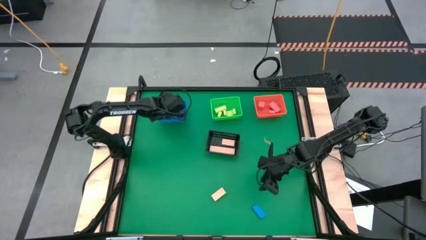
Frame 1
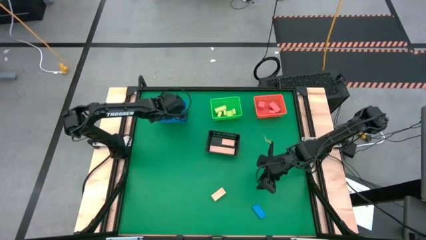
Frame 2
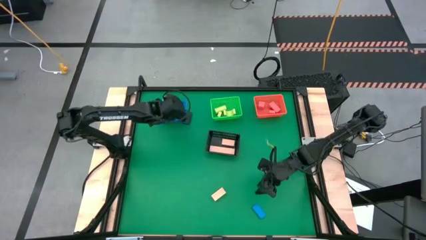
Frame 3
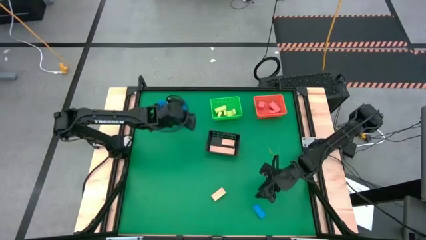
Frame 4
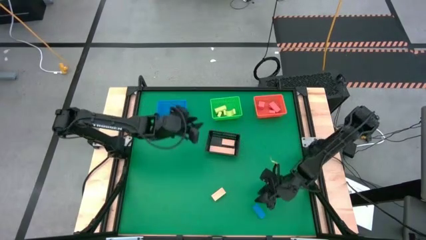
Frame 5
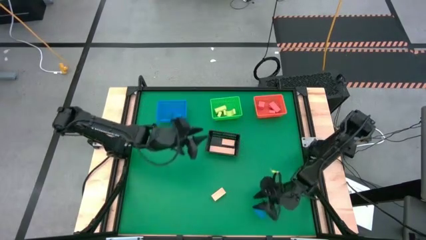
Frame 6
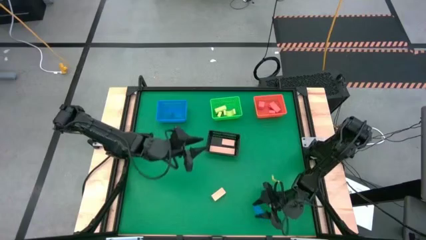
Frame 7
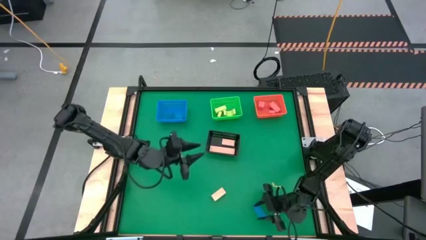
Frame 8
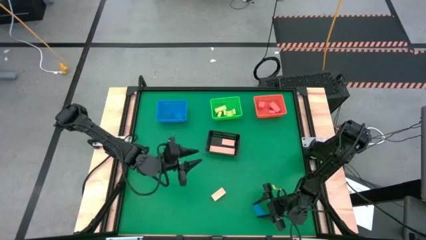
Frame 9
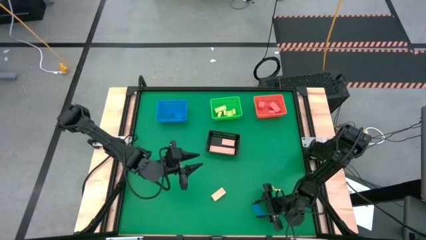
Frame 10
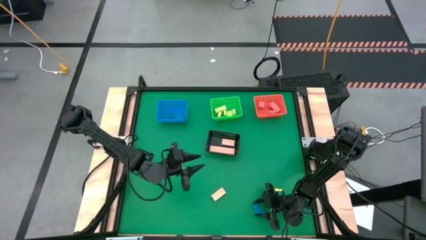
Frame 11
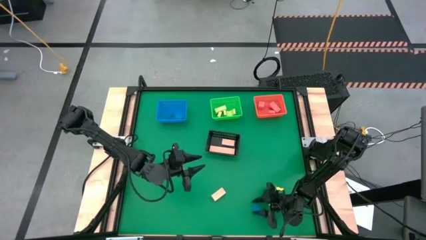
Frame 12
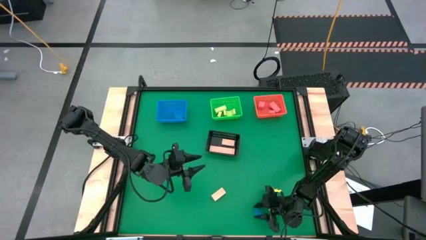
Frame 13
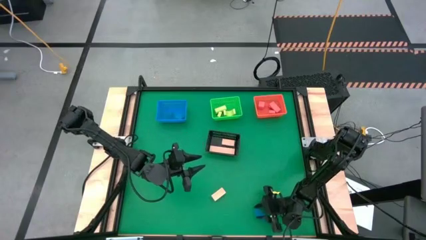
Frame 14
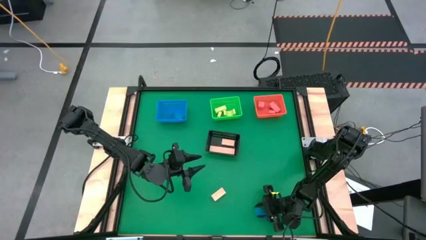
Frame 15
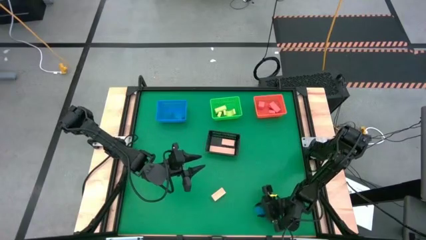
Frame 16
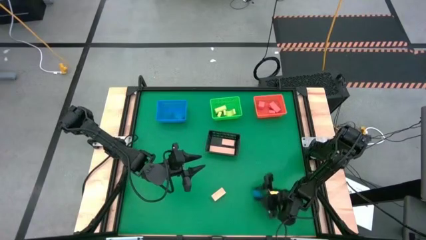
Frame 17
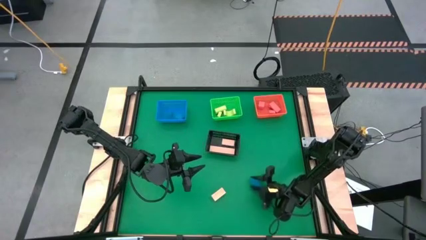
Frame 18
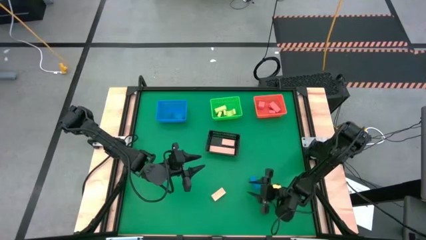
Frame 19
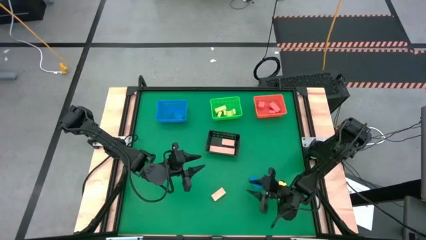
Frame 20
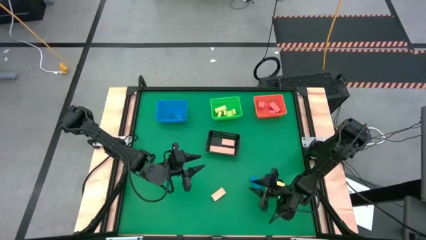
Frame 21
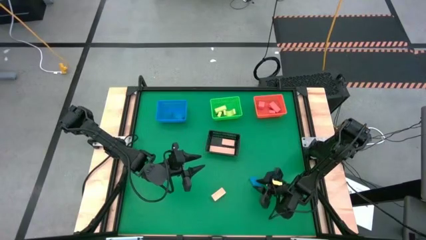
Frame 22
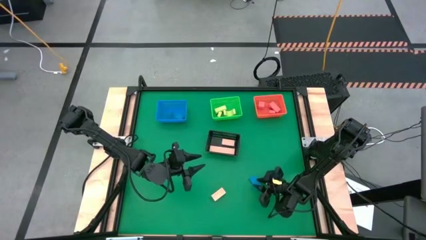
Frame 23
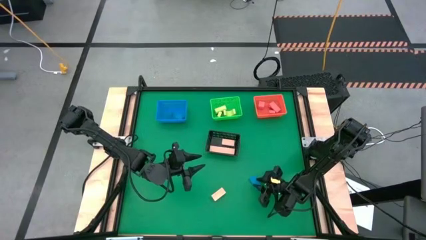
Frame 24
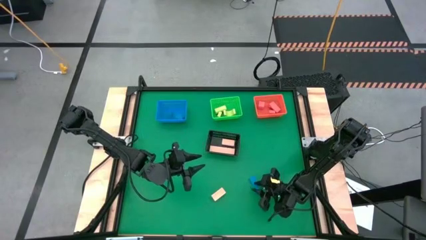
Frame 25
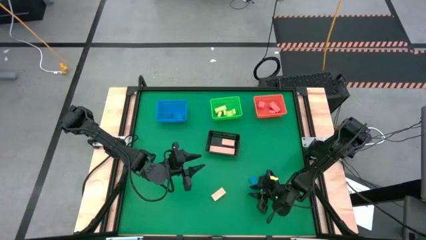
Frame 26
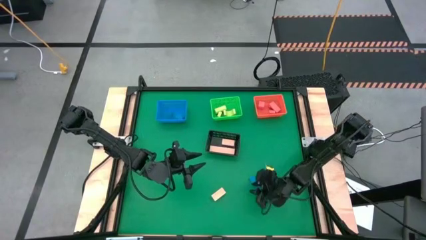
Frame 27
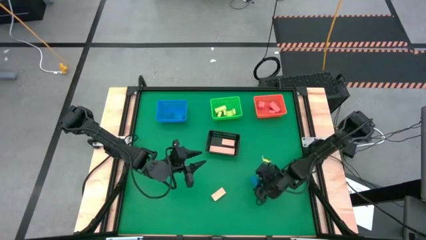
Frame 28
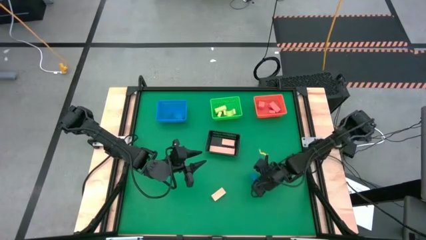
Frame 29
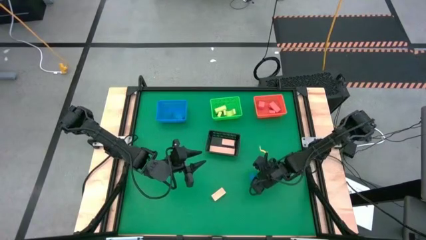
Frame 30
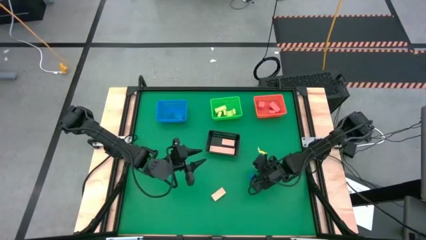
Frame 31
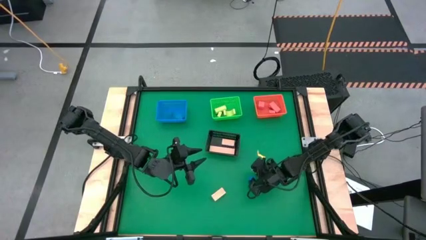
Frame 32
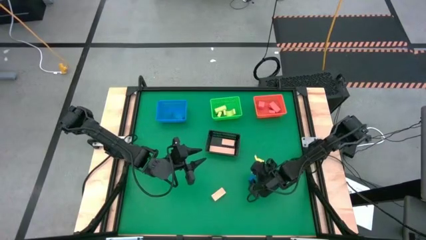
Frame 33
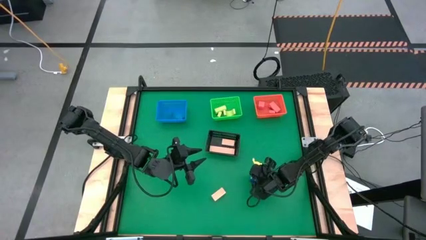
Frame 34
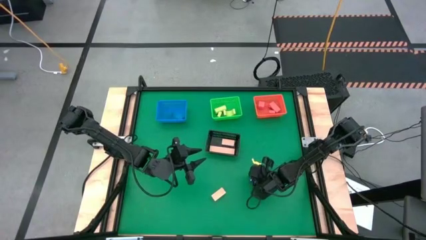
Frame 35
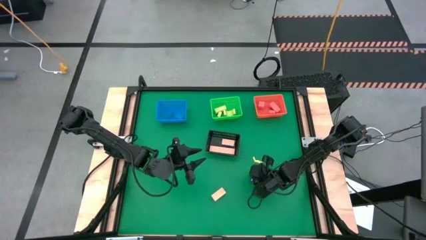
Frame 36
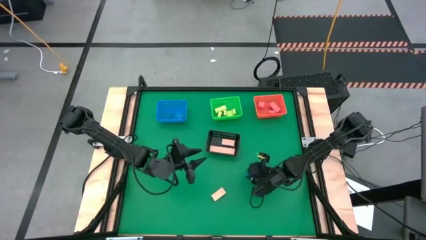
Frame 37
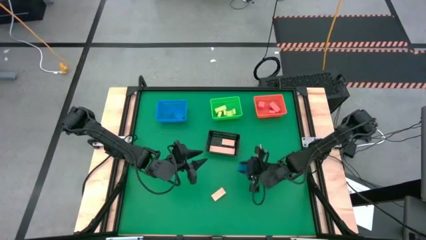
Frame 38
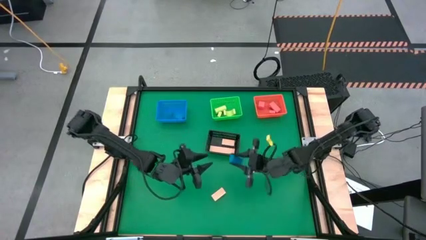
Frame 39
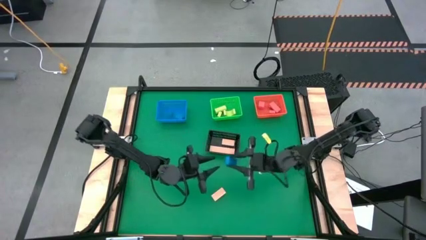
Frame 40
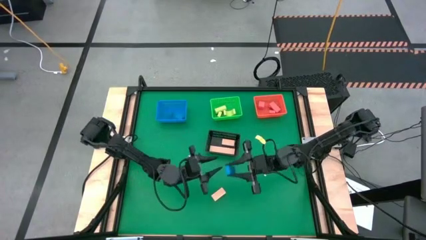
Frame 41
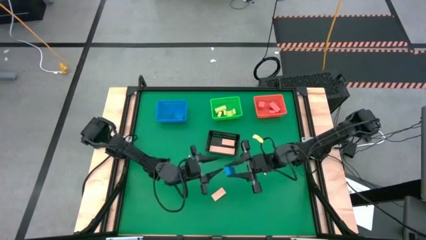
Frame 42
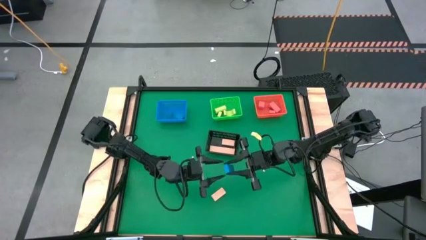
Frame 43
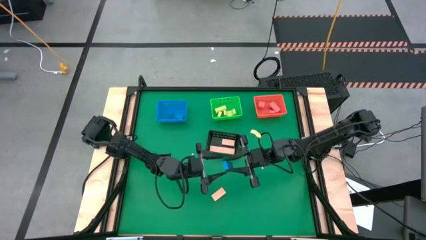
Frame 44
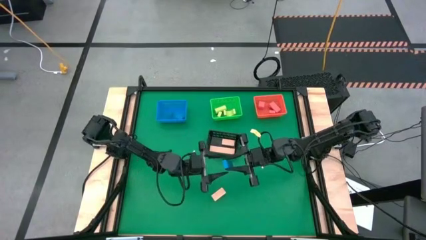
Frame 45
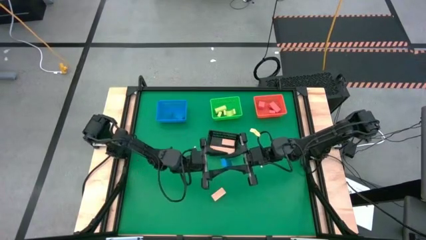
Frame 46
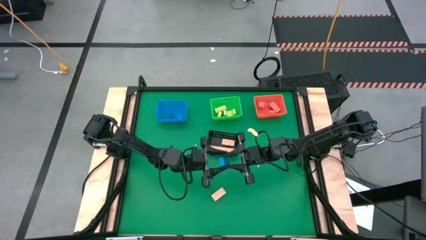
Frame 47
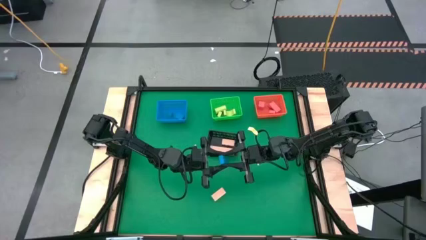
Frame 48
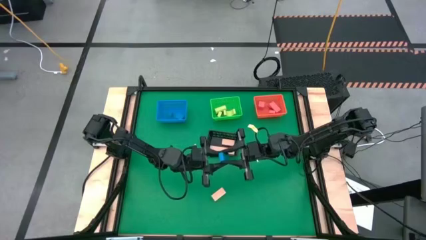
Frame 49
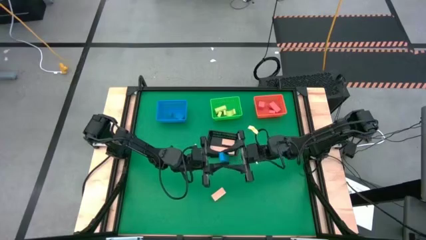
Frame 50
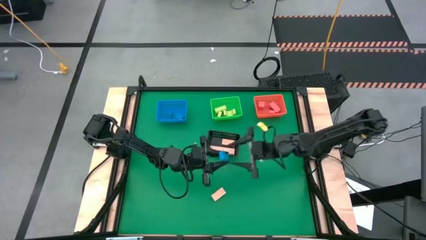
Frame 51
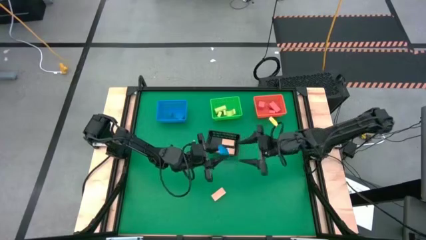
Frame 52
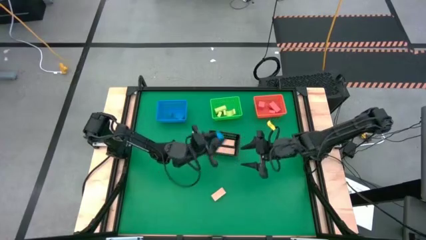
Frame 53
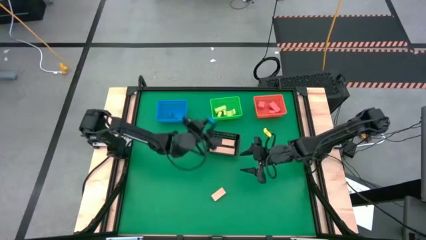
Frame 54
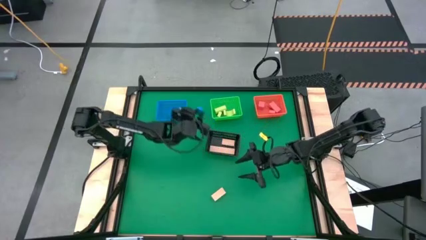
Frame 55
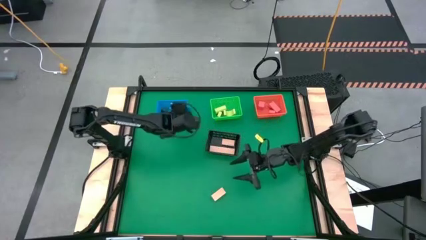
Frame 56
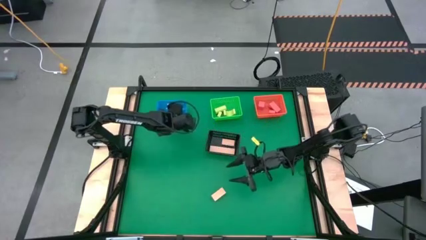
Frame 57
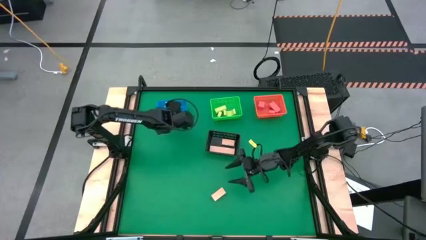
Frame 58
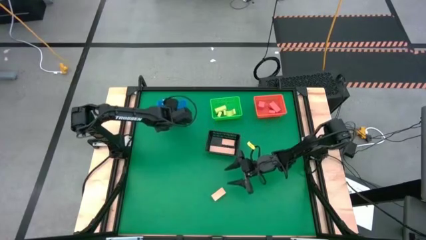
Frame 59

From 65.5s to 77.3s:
Task: Sort & place blocks by color
Put the blue block into the blue bin

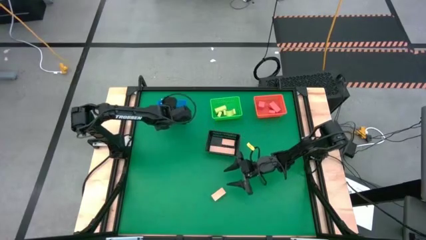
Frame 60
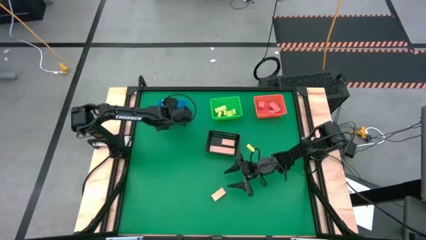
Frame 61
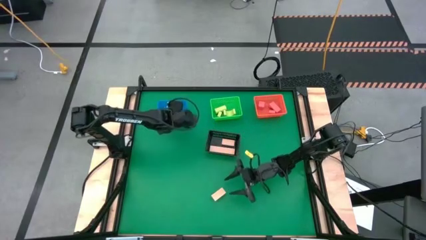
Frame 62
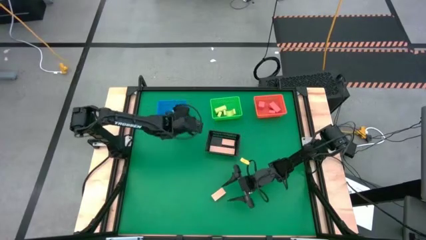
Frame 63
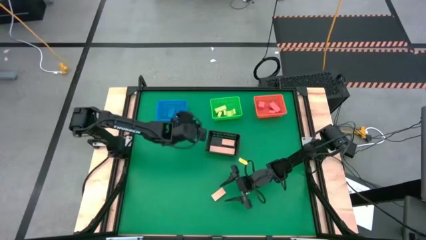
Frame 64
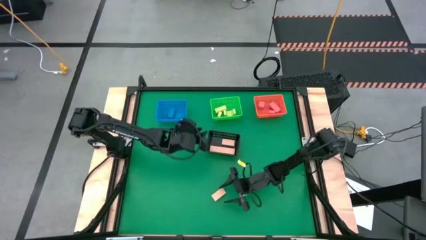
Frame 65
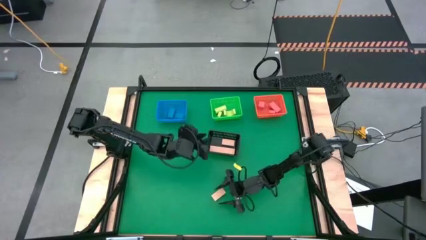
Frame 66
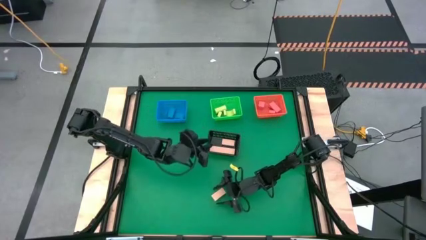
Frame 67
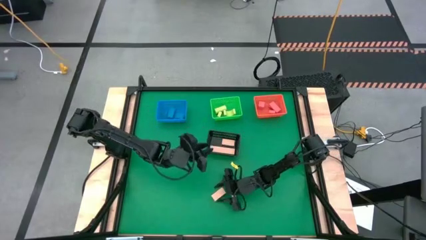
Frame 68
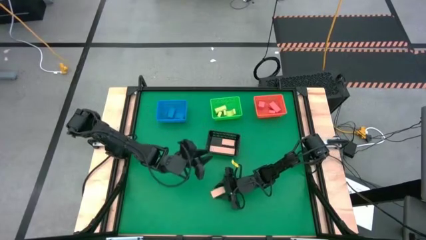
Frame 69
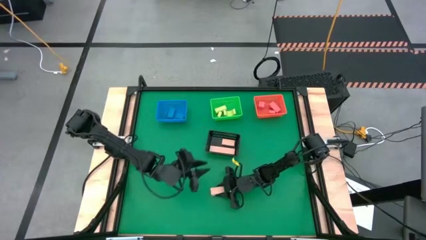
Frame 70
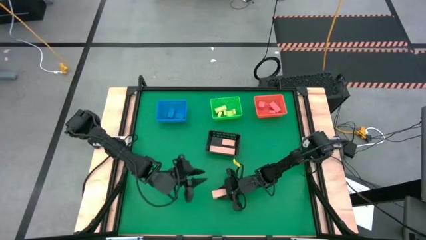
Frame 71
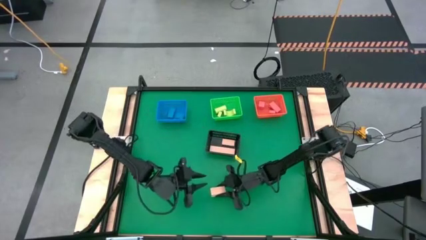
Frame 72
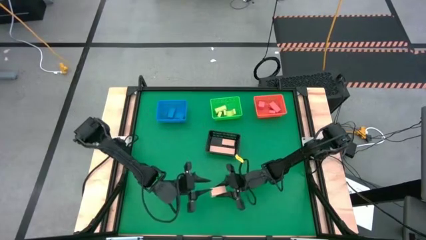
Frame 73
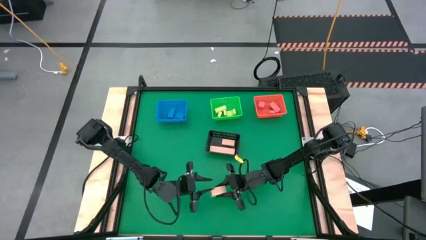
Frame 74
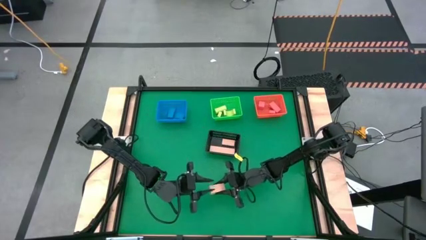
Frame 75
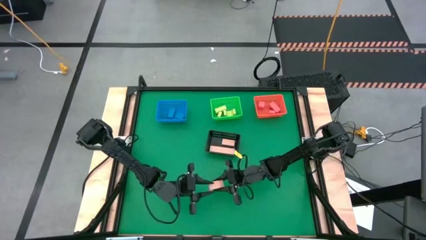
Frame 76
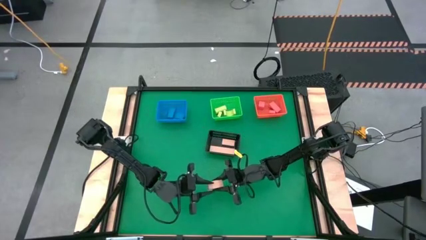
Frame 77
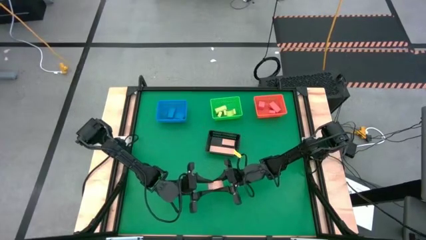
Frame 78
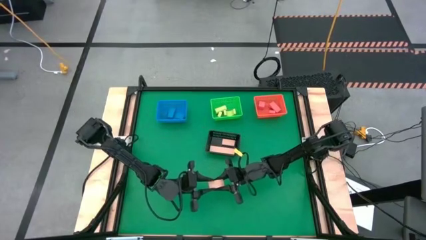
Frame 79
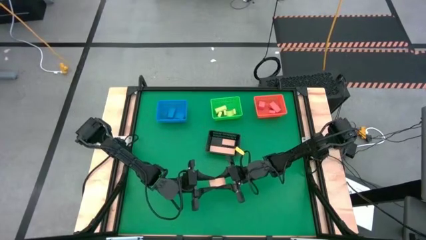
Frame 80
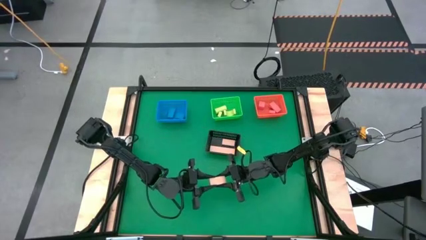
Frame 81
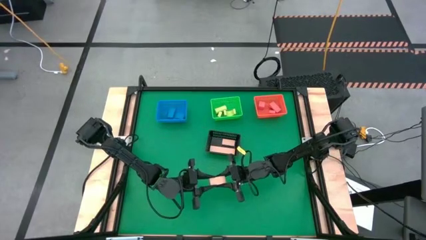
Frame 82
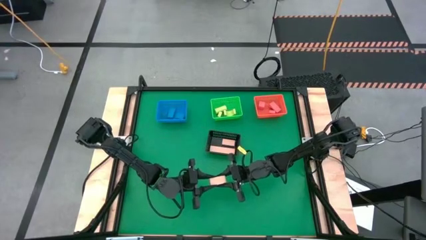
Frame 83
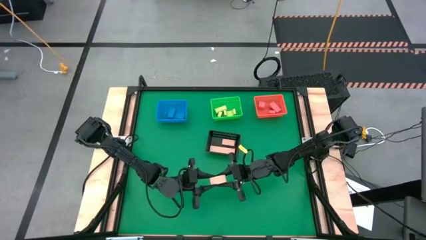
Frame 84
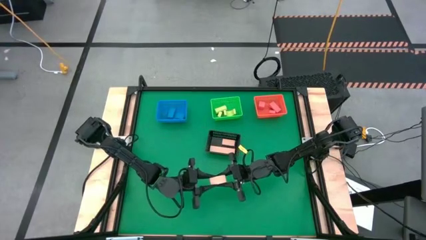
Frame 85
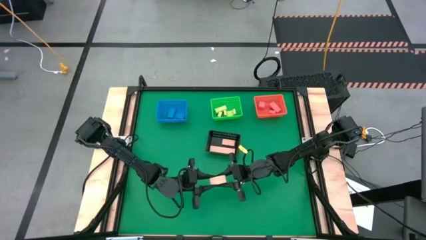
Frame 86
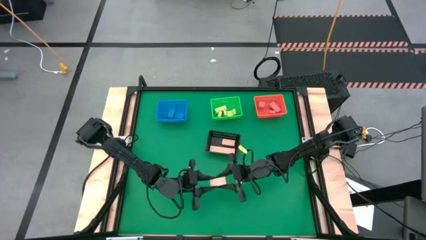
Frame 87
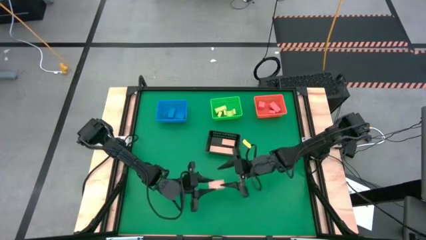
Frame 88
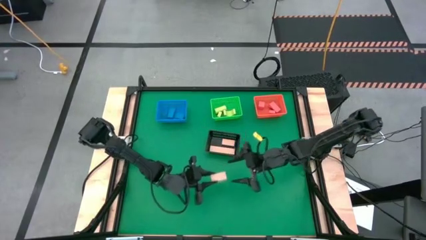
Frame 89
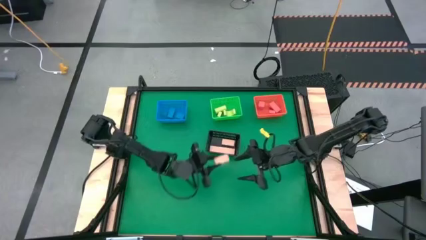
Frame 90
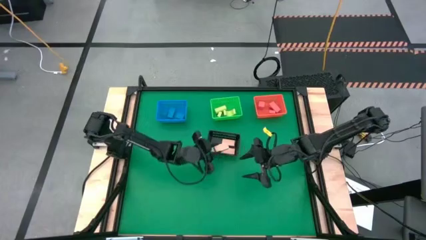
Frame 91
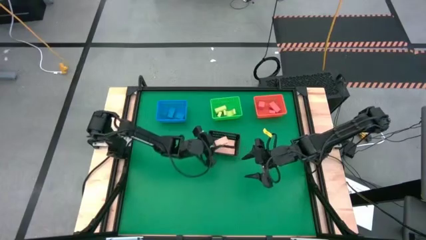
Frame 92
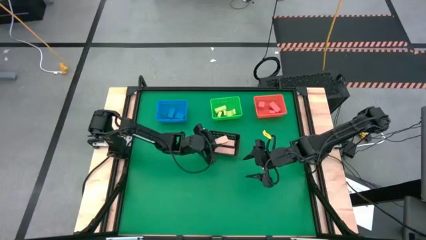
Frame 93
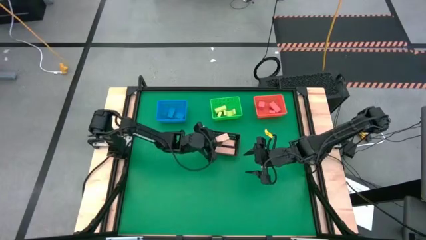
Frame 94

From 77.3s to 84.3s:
Put the wooden block into the black bin
